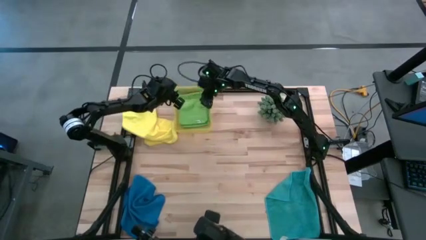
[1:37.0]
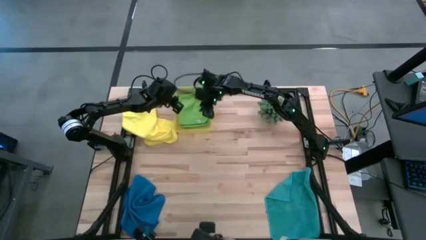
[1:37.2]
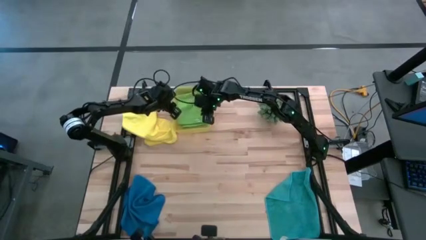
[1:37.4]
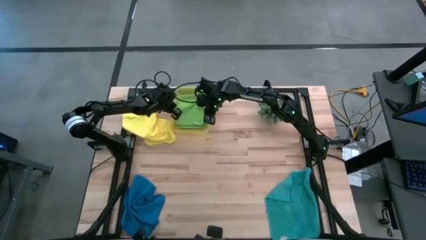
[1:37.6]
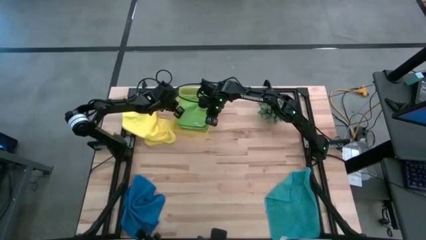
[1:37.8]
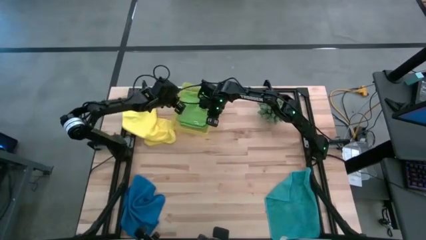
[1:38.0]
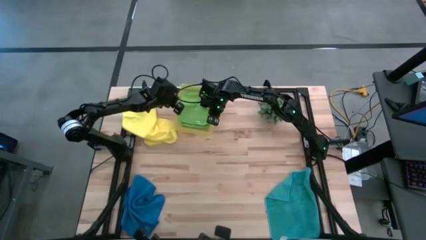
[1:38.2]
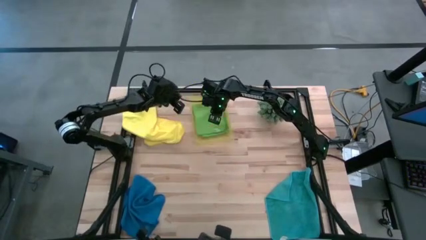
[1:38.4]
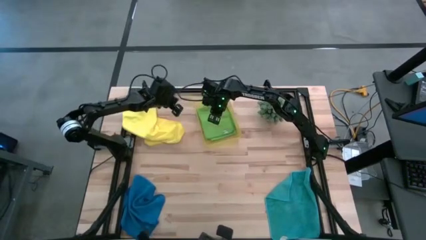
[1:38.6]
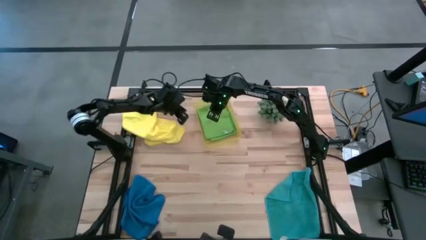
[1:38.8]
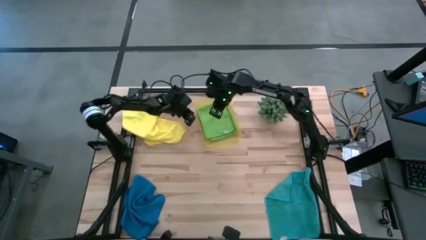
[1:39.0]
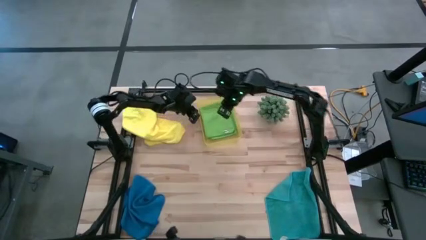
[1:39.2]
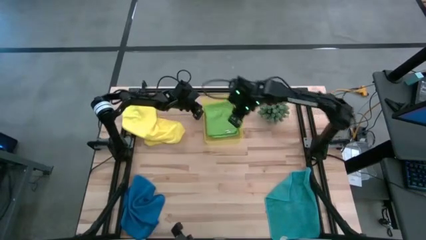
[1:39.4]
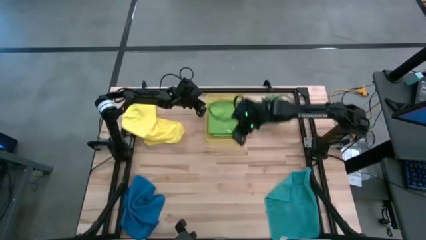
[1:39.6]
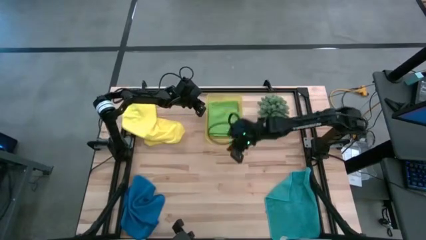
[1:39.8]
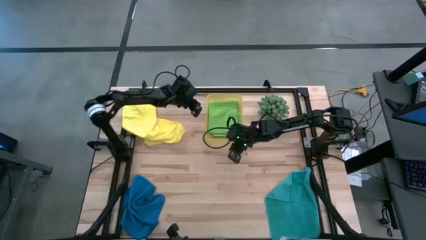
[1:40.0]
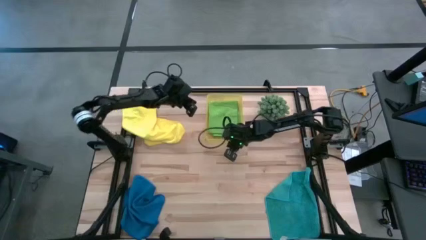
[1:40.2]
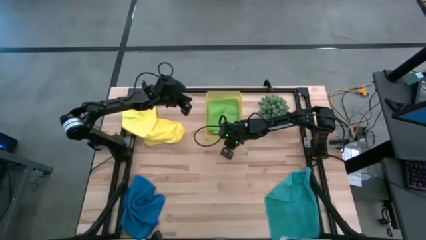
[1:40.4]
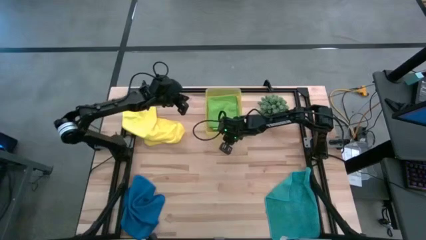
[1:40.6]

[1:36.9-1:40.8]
Task: Fold microfiber towels
Adjust the yellow bin

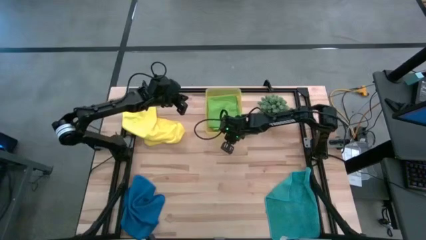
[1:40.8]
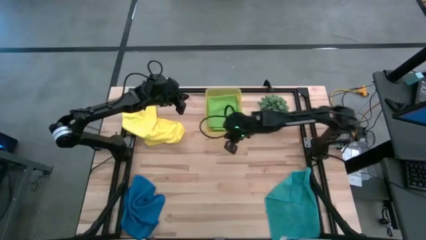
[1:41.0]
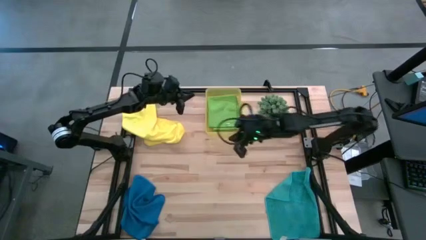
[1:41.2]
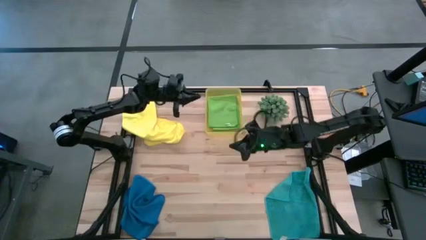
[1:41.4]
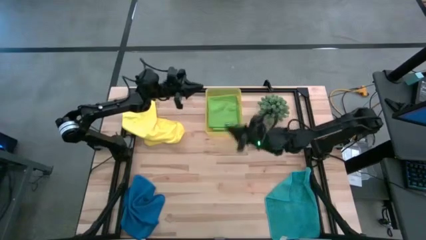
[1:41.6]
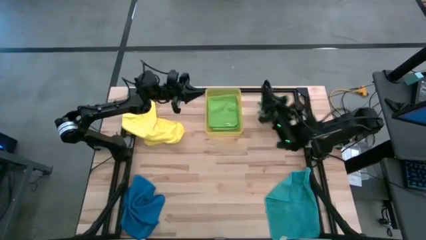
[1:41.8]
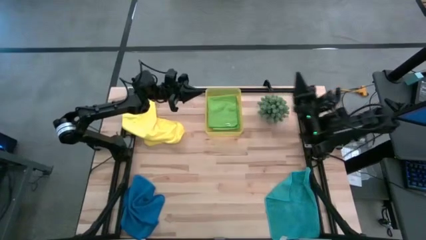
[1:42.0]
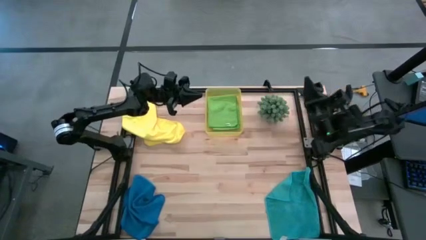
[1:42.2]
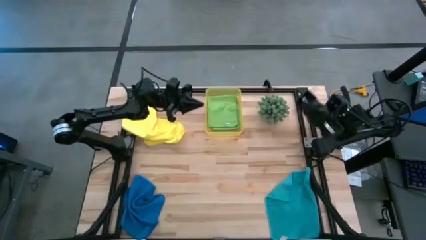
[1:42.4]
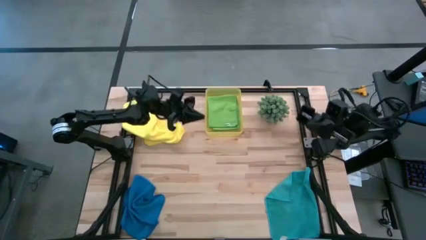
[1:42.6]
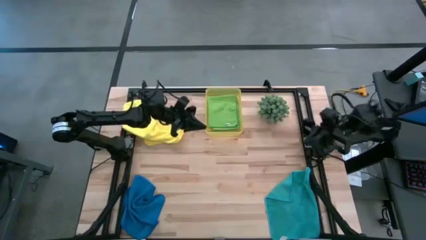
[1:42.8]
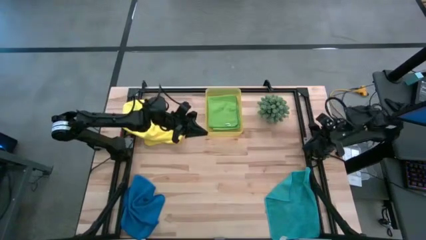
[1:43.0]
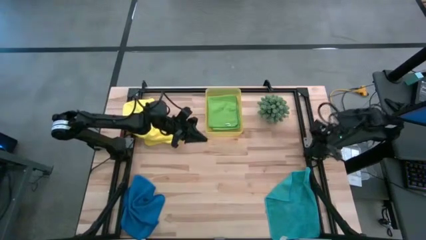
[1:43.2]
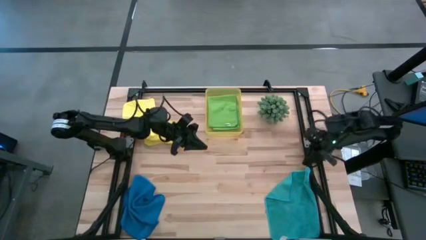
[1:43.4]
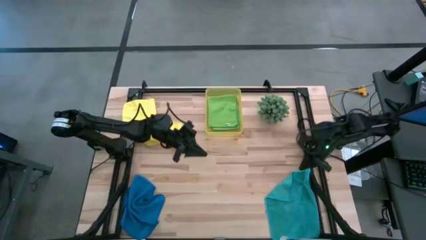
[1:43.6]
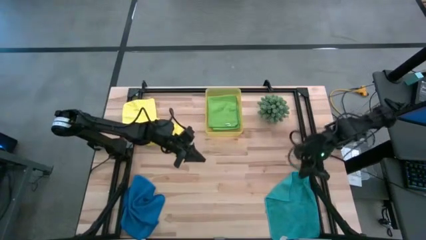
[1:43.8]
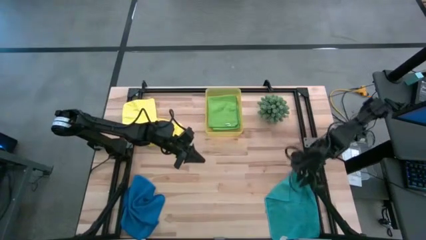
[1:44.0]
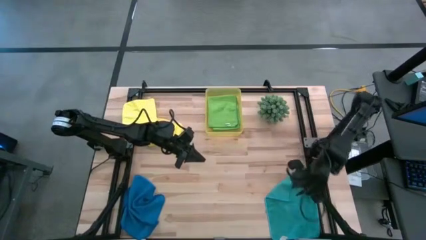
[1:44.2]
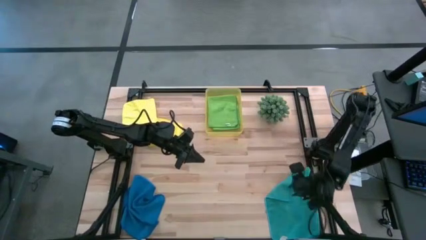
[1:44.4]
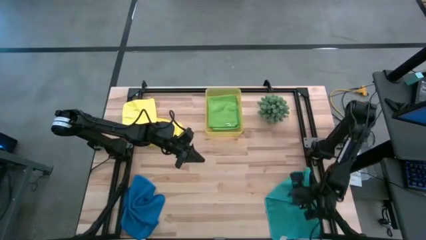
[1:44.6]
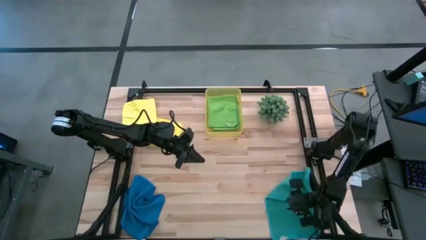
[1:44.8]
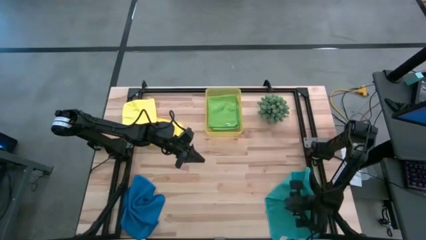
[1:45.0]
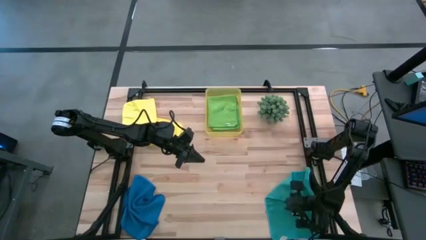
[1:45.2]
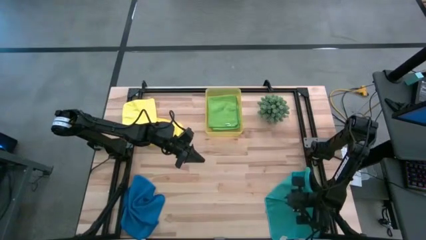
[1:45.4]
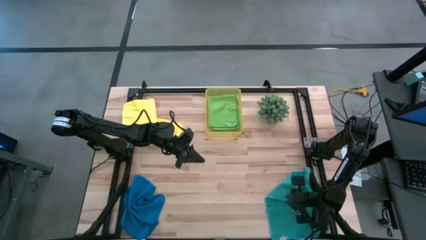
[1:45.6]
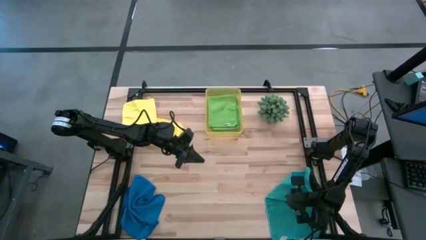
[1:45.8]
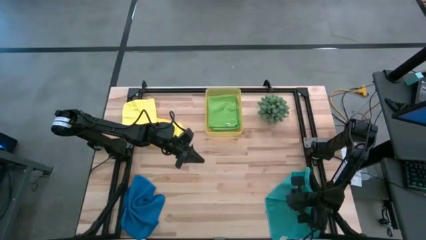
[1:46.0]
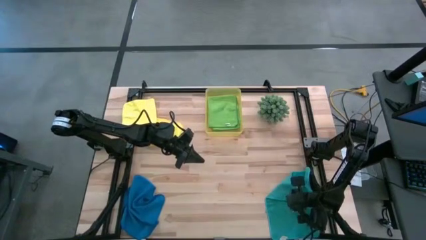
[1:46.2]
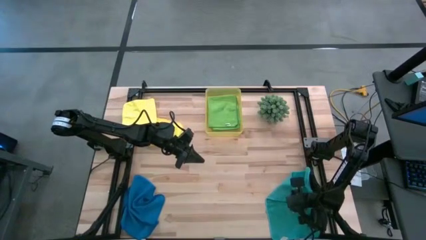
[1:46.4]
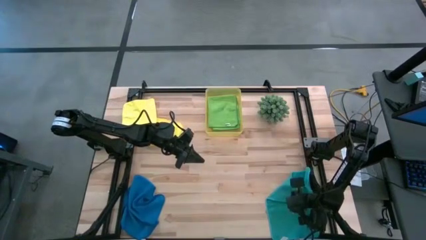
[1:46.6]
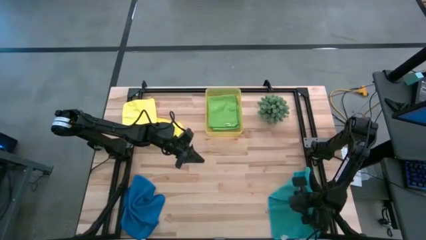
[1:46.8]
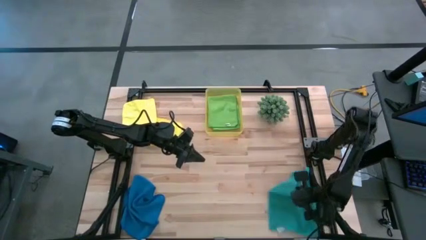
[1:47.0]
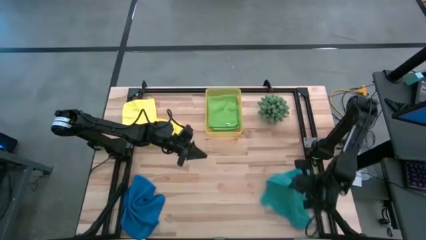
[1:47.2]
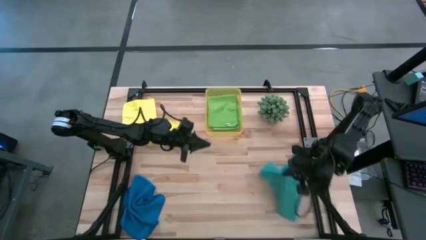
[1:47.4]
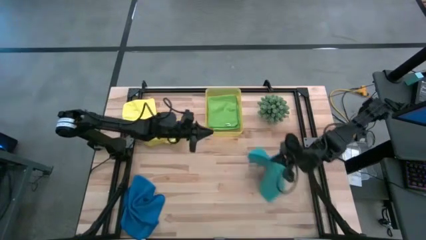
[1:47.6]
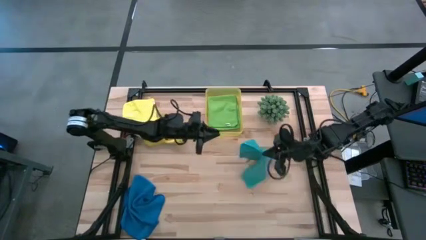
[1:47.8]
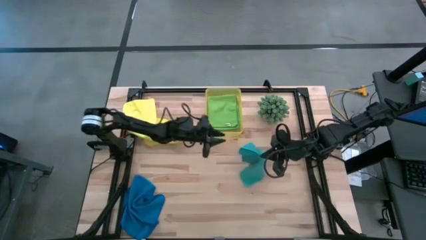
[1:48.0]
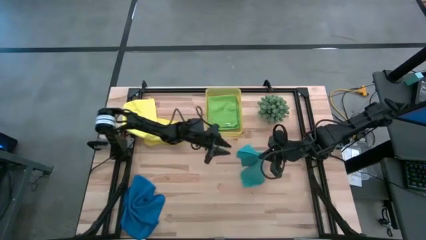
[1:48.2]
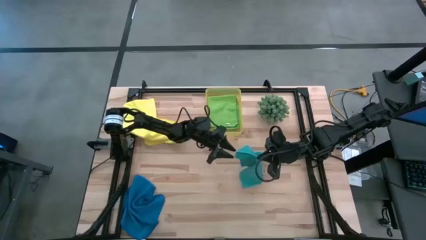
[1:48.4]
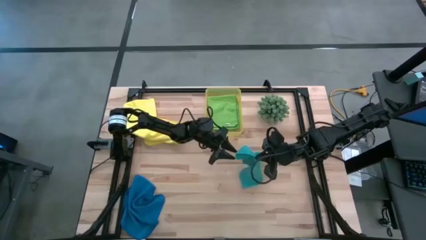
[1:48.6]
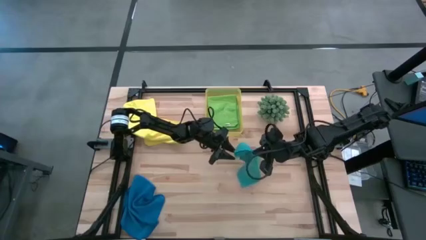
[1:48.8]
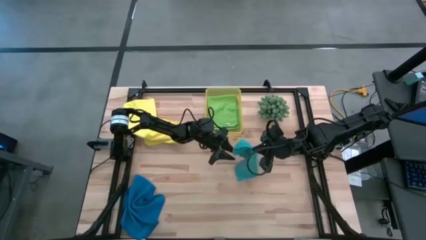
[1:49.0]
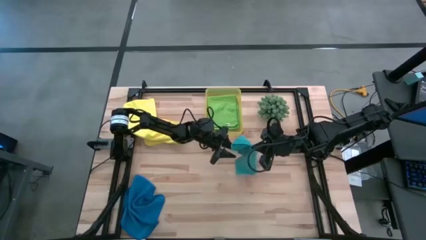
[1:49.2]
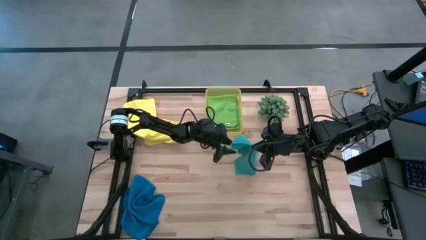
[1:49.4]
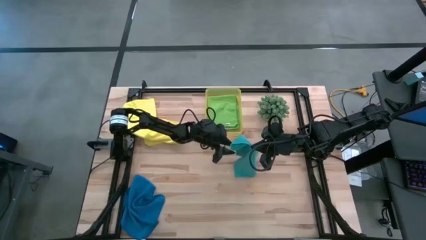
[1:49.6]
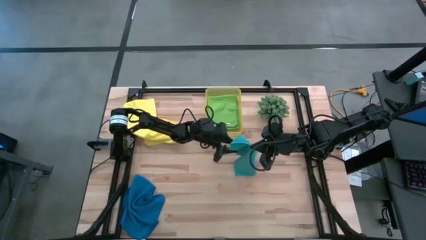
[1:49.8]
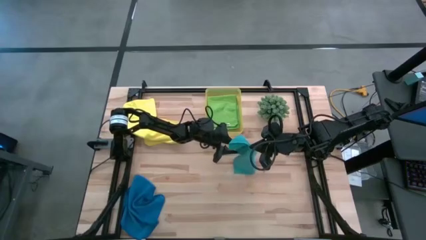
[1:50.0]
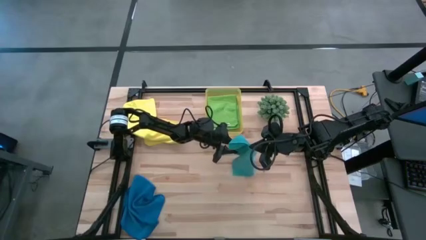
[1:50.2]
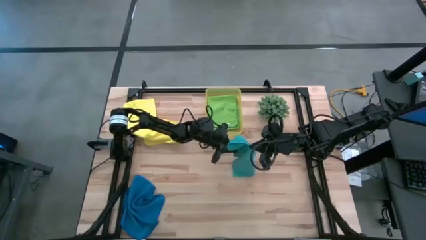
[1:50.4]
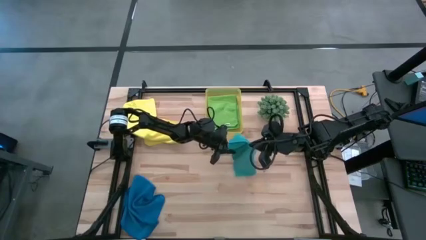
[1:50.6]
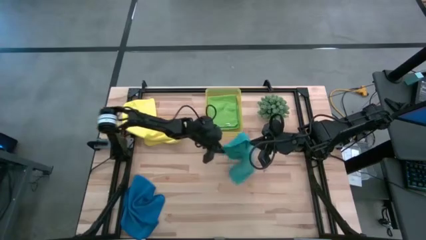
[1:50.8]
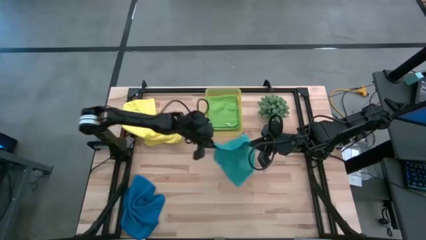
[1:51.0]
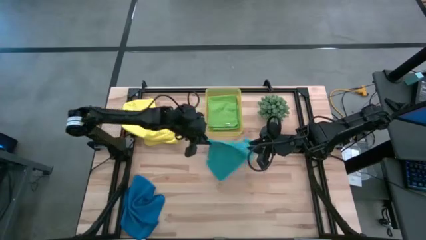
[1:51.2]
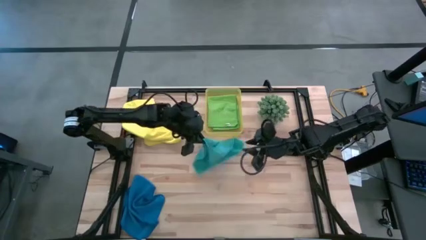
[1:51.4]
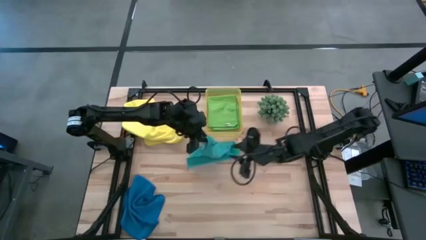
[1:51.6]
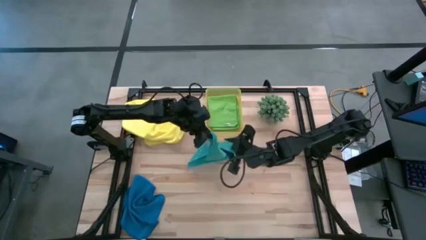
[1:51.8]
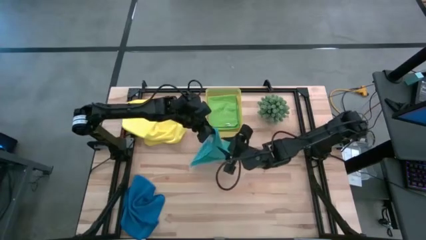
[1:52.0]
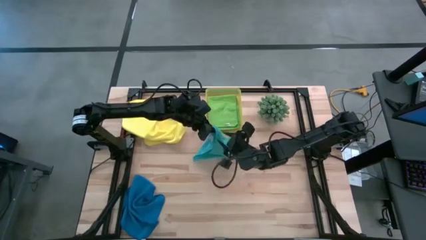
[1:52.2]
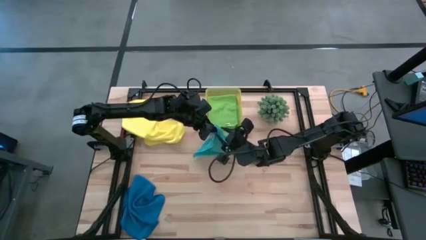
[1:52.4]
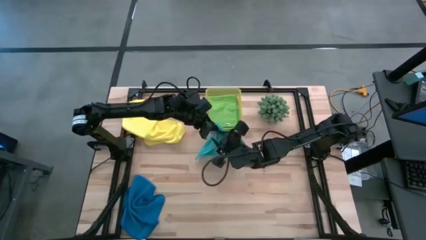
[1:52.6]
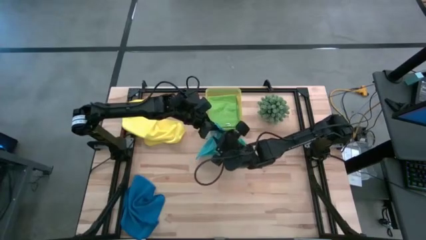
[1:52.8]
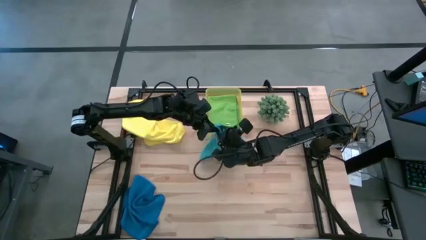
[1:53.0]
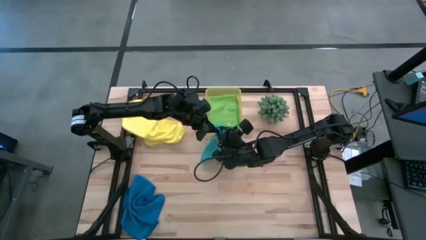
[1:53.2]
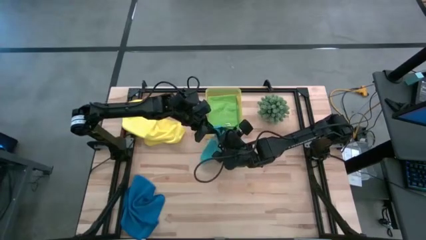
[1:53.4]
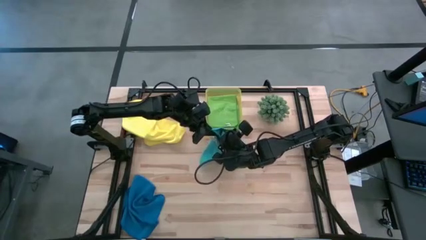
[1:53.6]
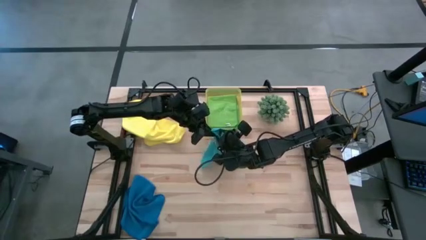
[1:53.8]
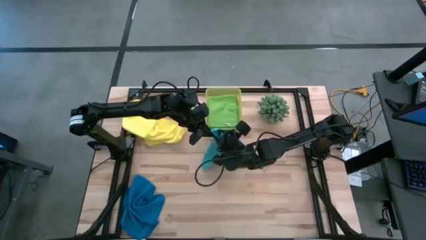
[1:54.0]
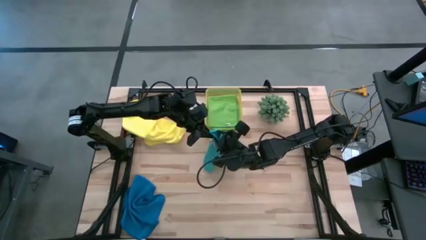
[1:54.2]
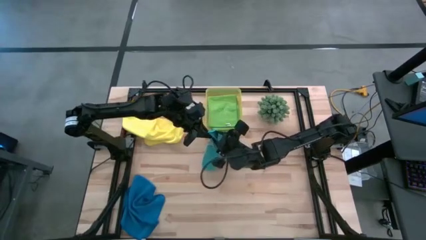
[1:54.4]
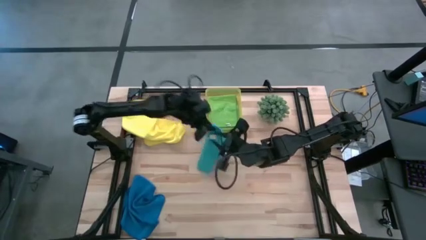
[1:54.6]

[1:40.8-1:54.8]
Fold the light blue microfiber cloth
